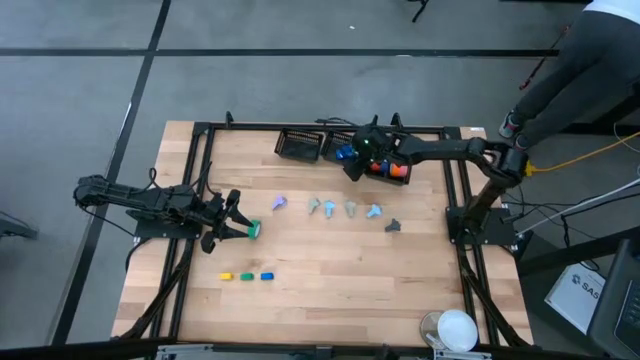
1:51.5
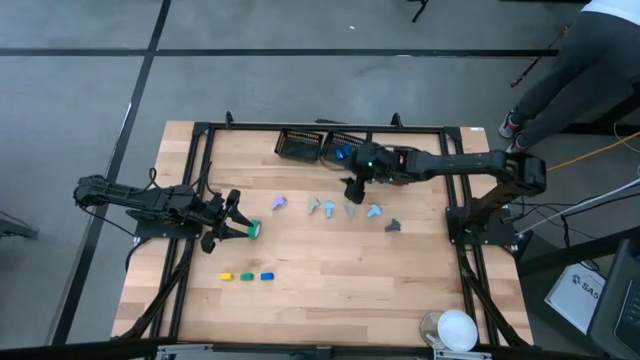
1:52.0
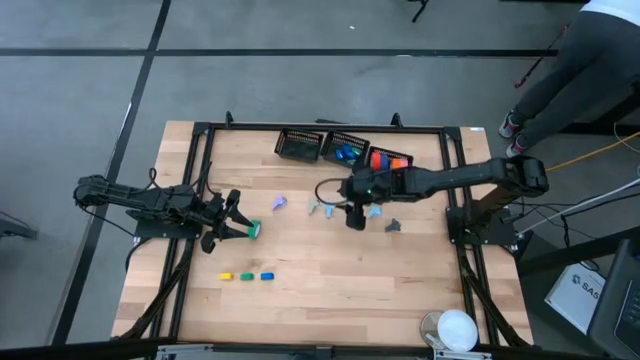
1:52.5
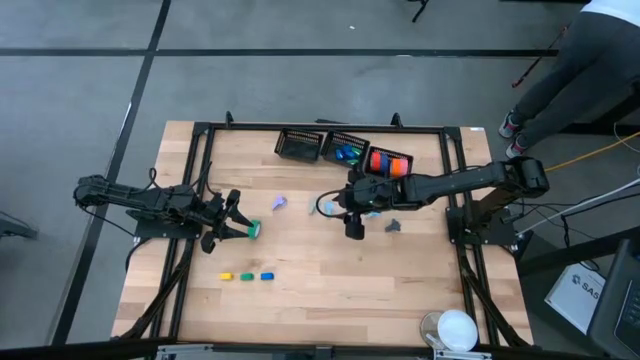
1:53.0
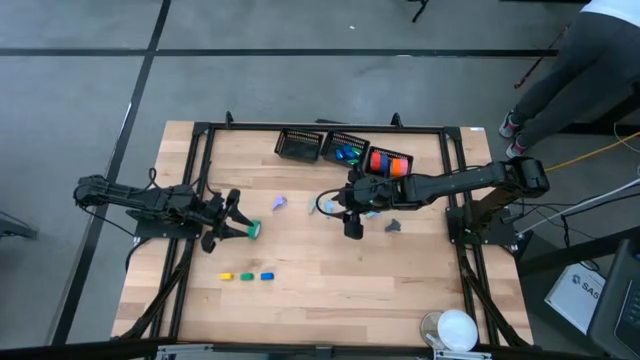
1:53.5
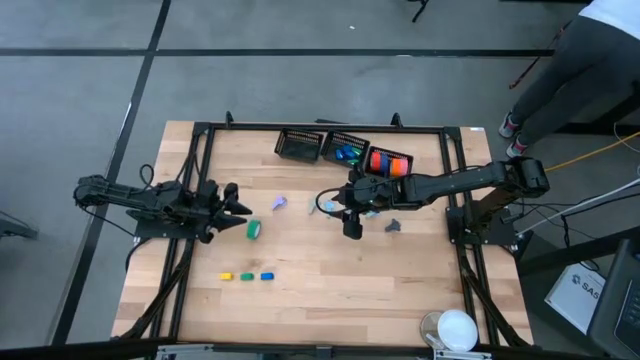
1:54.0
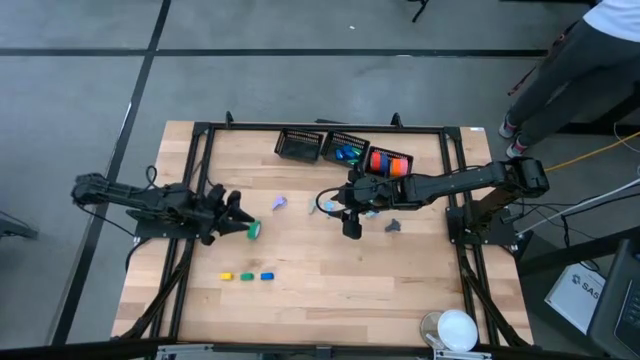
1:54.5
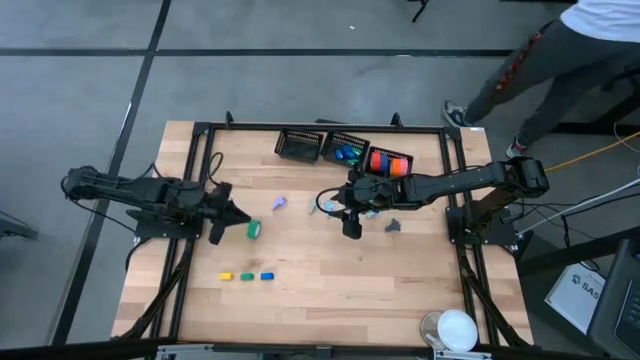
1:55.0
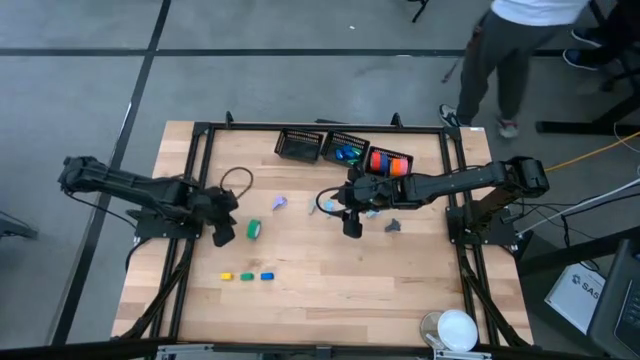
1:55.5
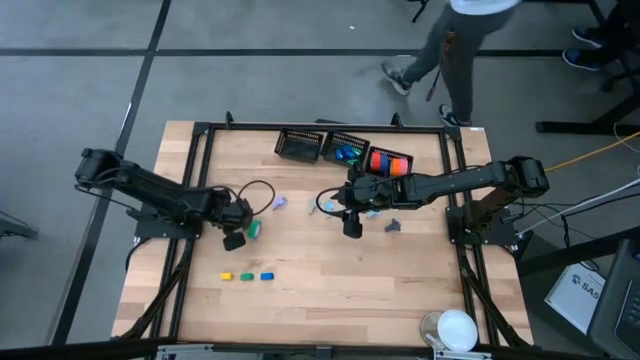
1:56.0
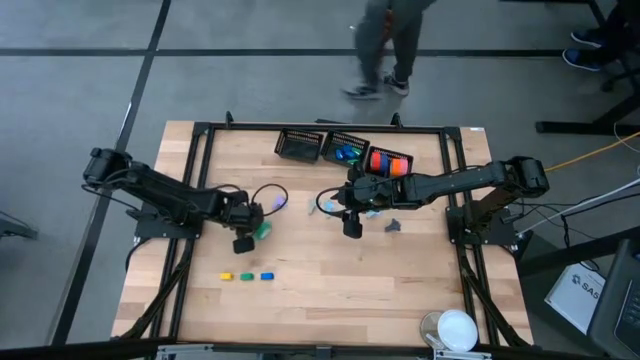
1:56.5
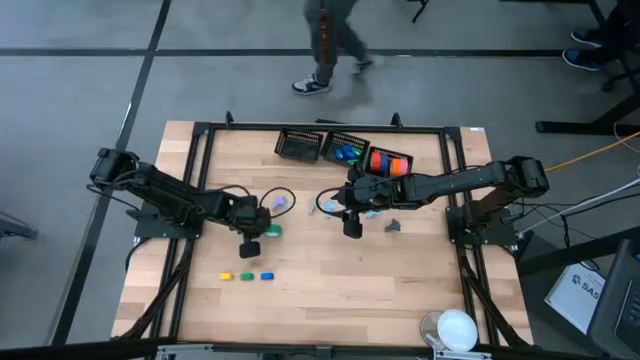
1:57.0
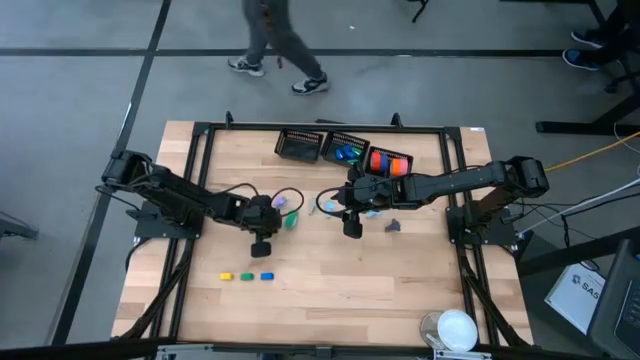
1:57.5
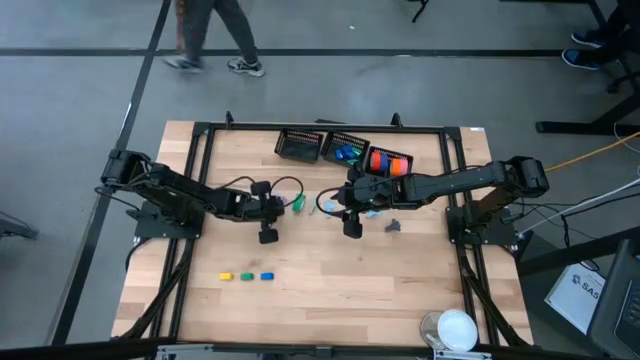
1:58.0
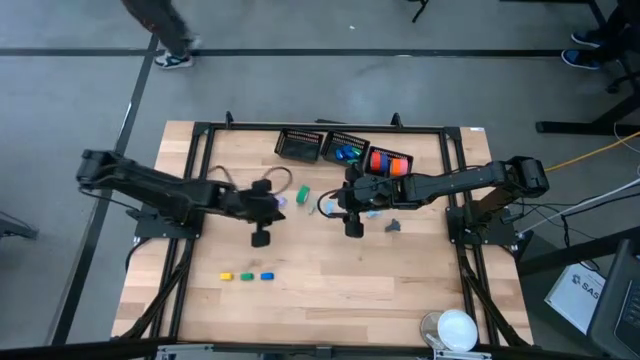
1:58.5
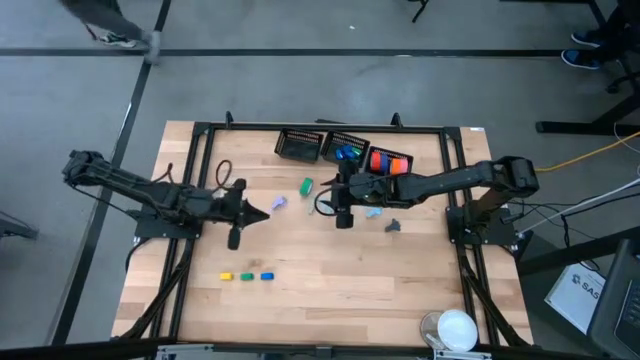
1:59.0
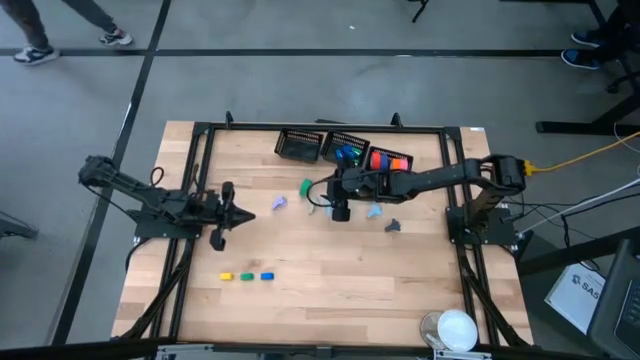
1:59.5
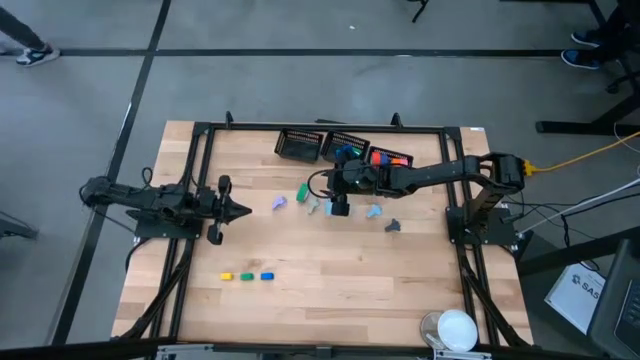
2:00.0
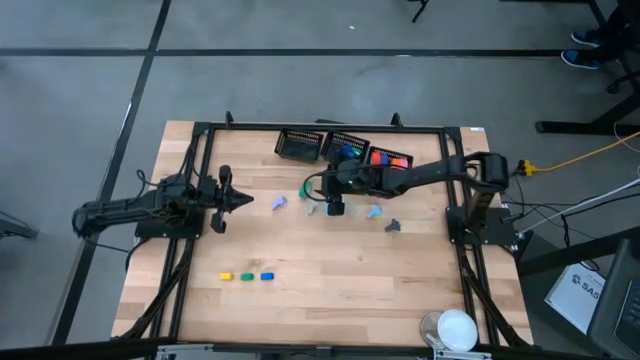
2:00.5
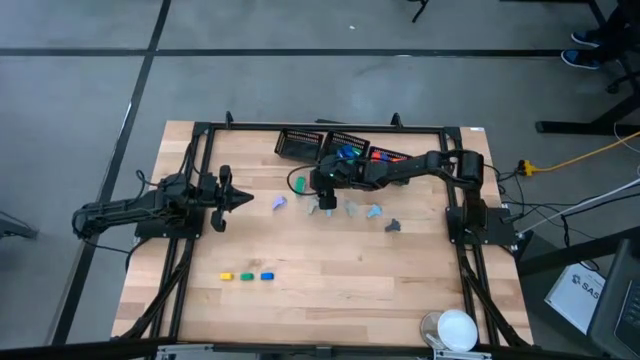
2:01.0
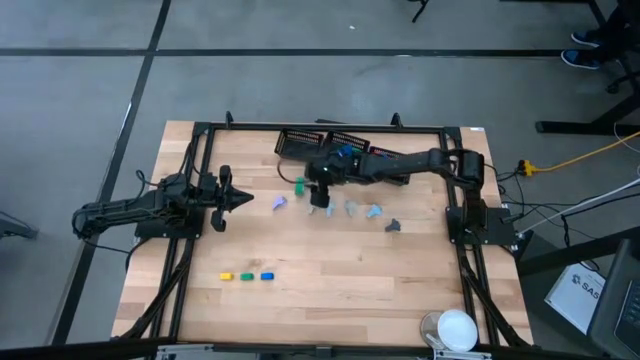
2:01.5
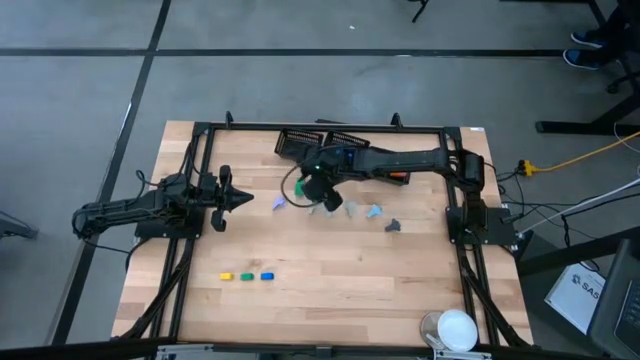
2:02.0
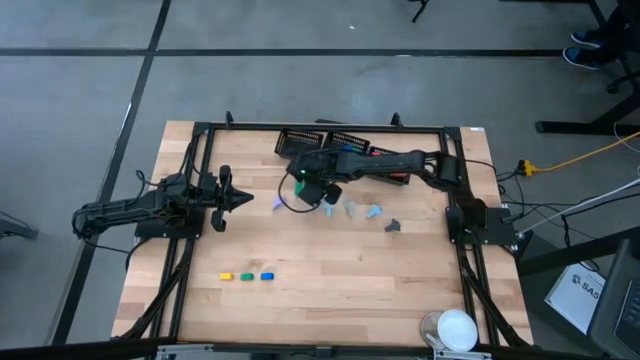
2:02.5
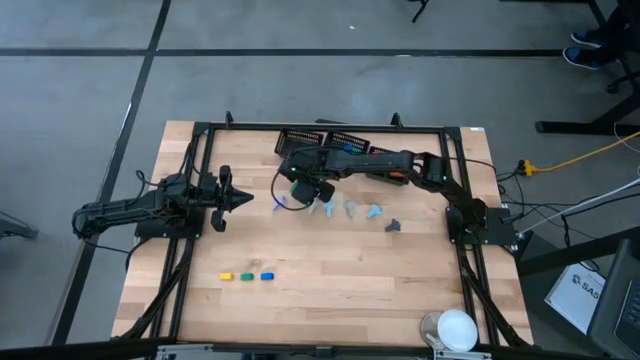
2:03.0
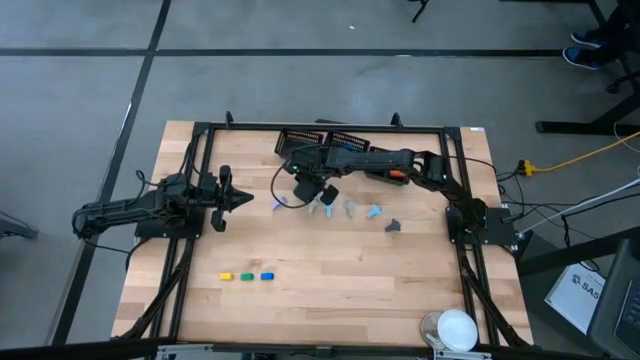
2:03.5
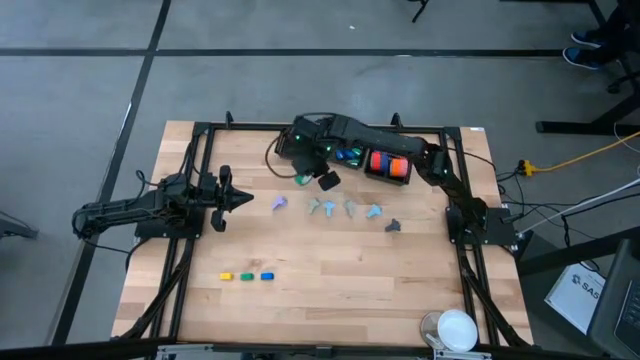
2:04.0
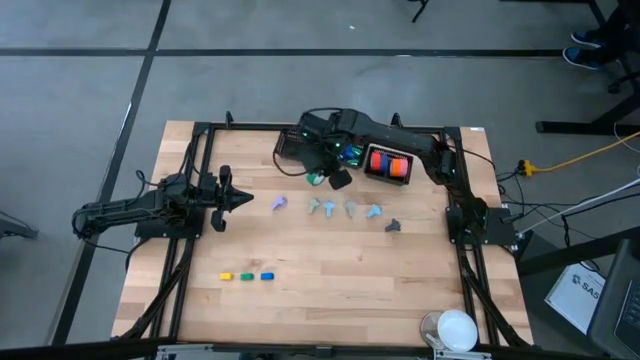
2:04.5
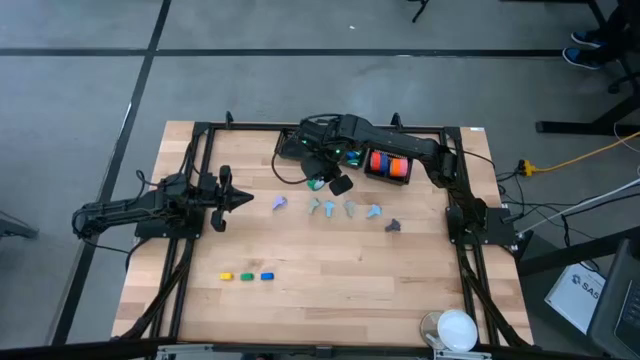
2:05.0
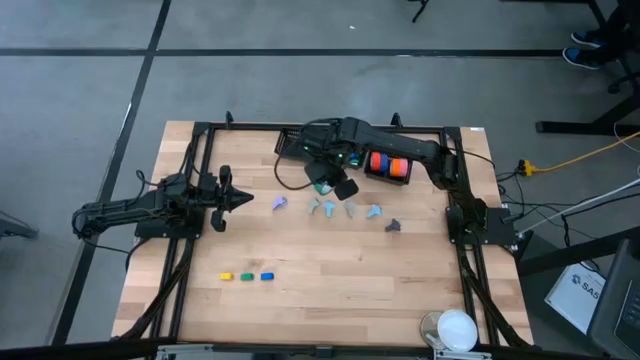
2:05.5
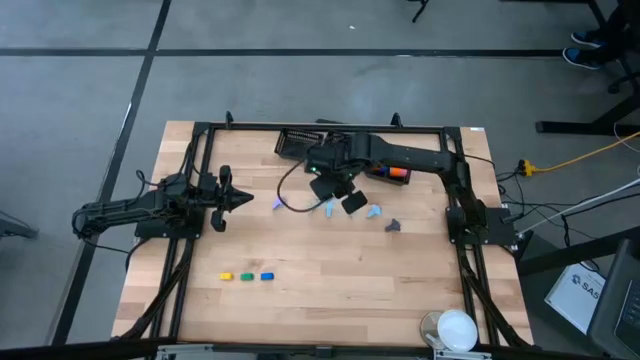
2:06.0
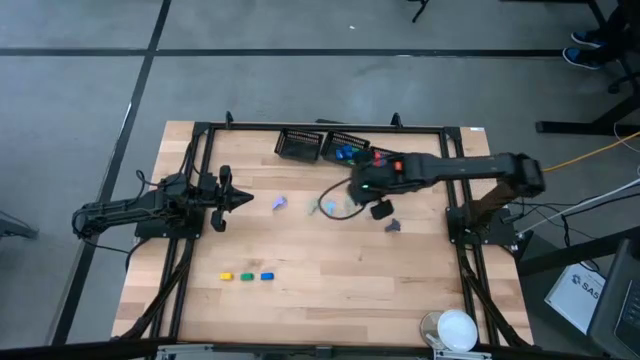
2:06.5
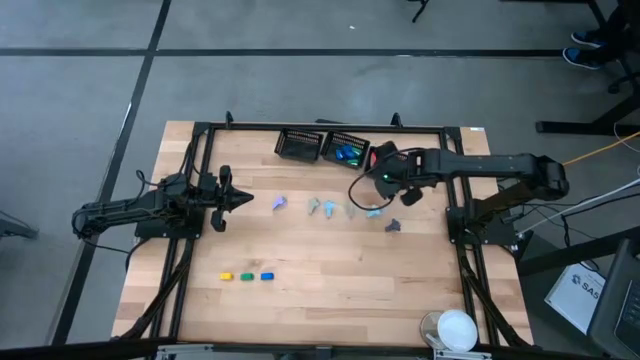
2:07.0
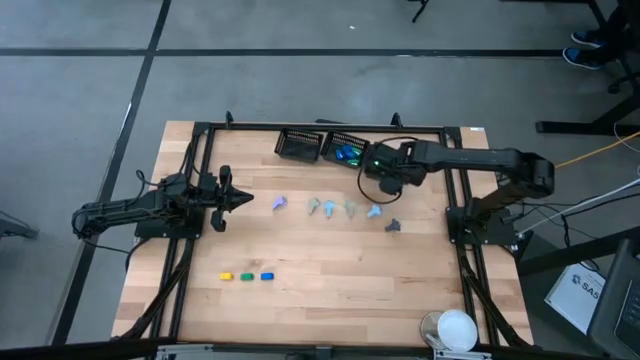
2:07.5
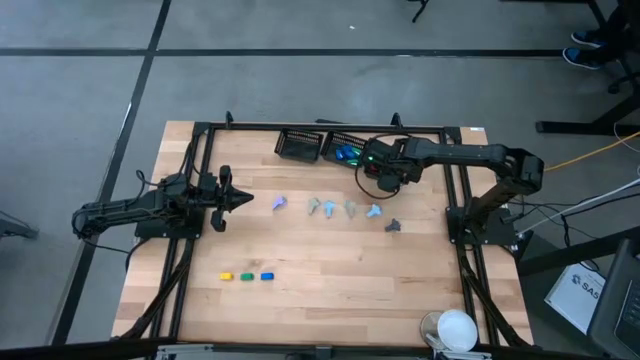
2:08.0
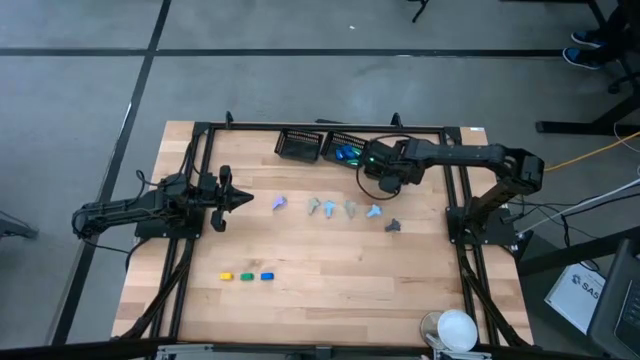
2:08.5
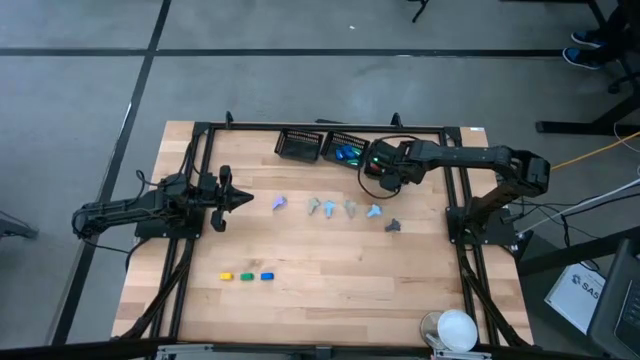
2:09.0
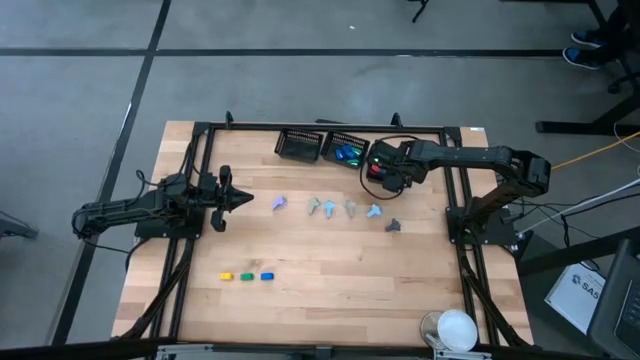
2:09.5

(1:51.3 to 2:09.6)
Task: Pick and place Stapler, Stapler remover, tape
Put the green tape into the right black bin

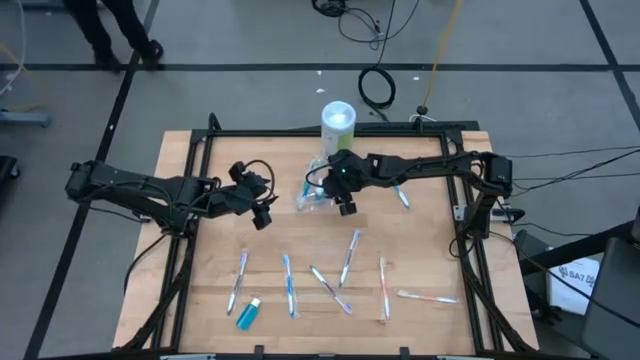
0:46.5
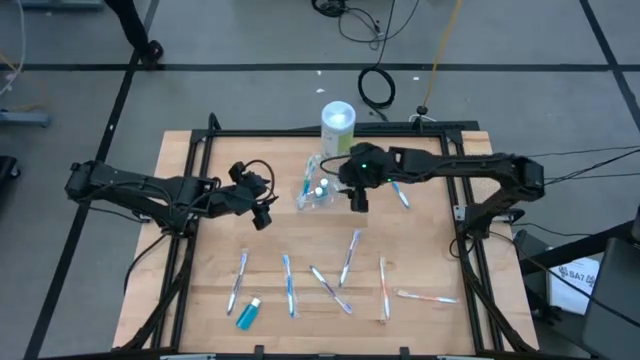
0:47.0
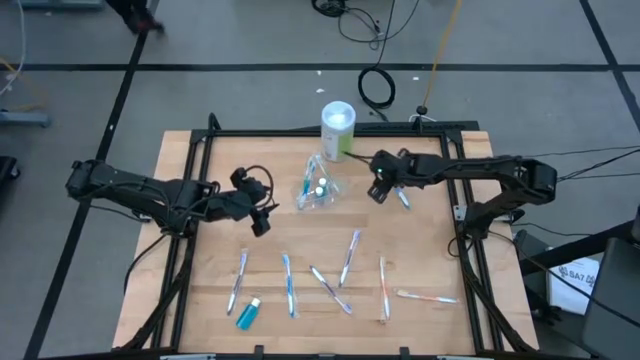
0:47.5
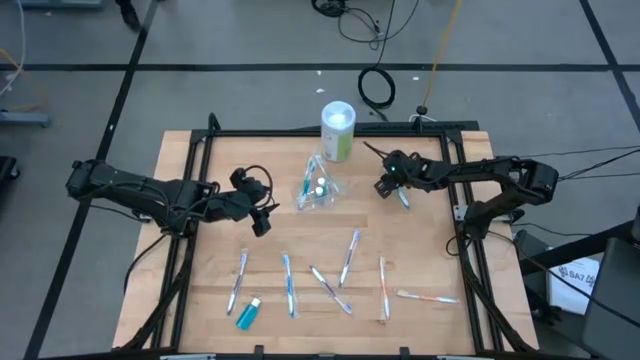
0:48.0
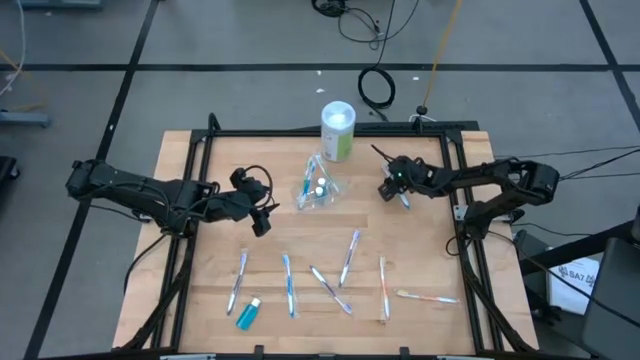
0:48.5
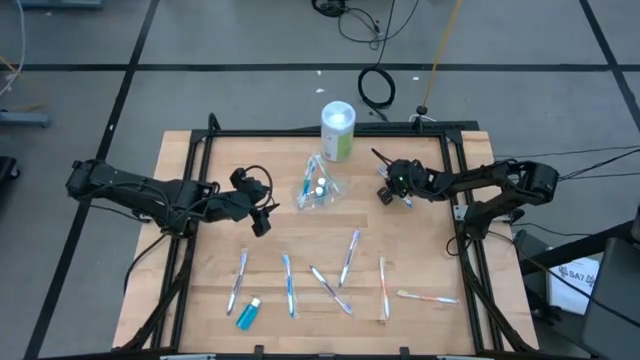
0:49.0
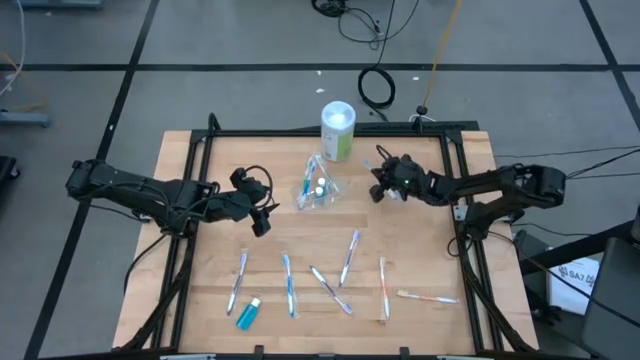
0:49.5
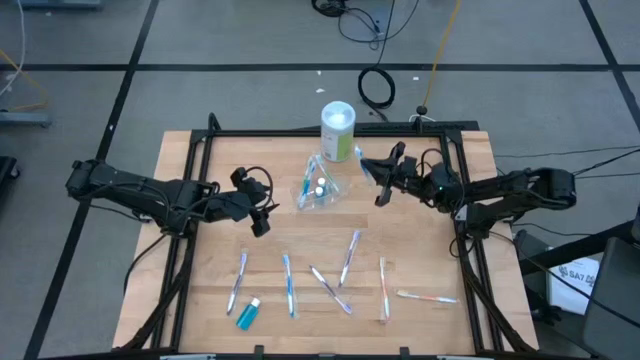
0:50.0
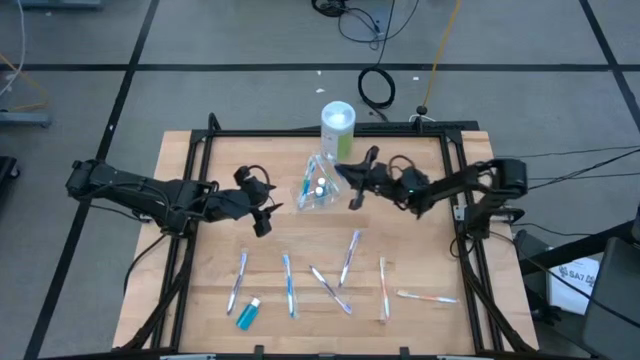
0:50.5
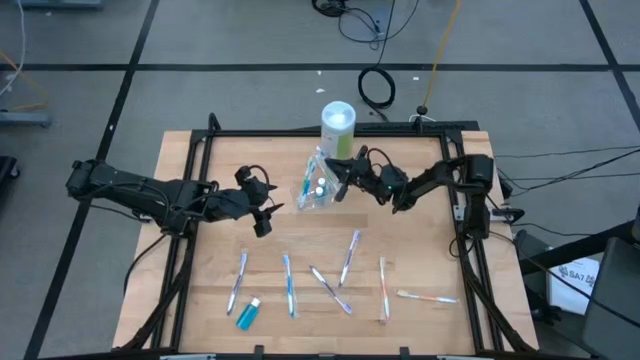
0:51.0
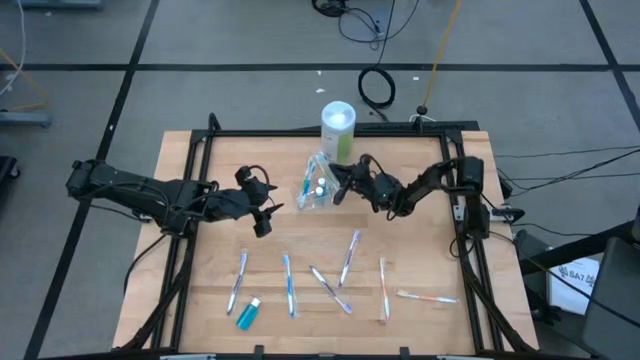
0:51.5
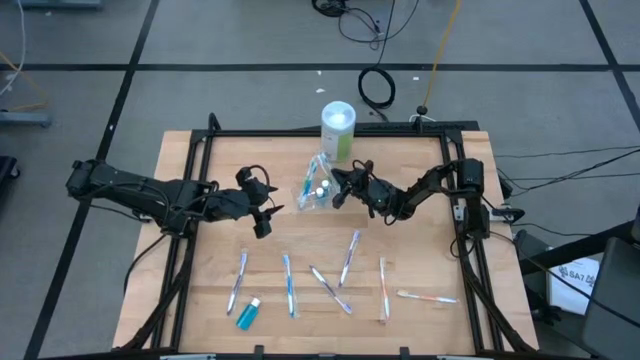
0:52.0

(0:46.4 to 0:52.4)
Task: Pick & Place toothbrushing station
Put the top blue toothbrush into the transparent organizer
